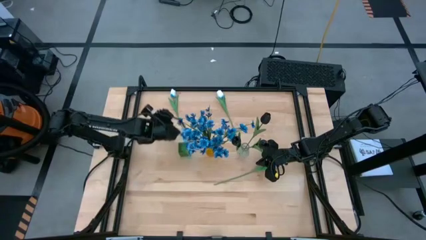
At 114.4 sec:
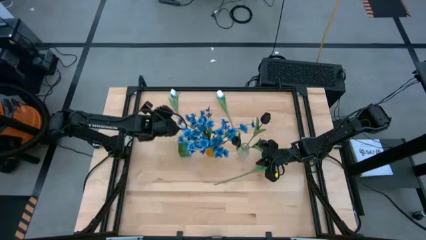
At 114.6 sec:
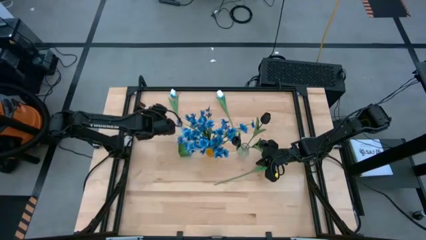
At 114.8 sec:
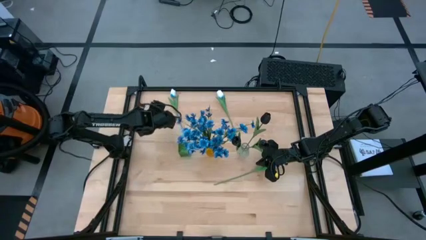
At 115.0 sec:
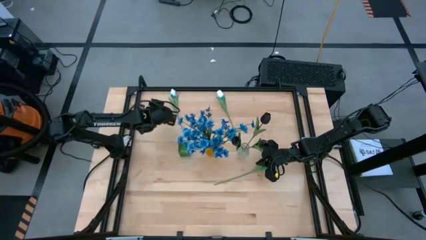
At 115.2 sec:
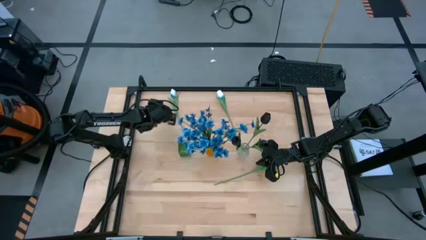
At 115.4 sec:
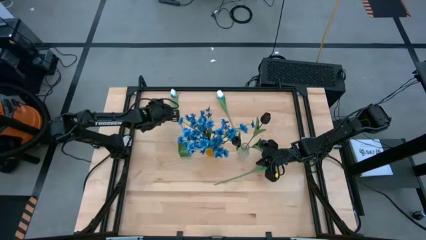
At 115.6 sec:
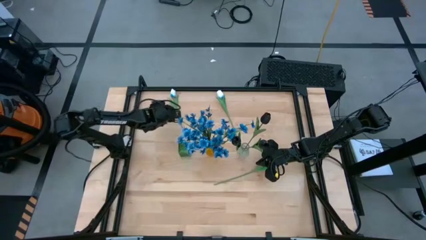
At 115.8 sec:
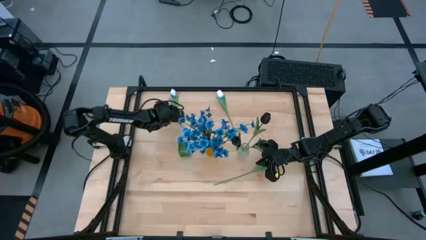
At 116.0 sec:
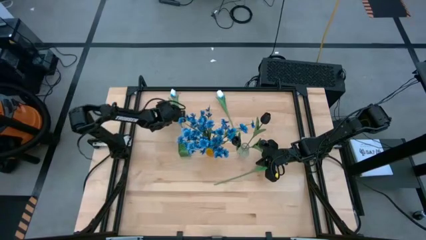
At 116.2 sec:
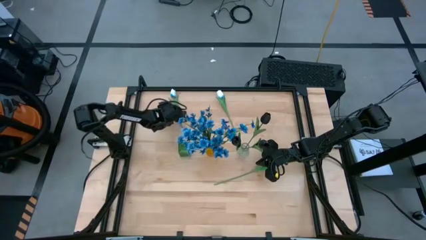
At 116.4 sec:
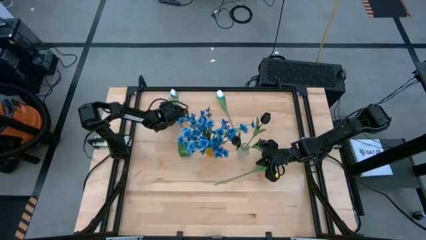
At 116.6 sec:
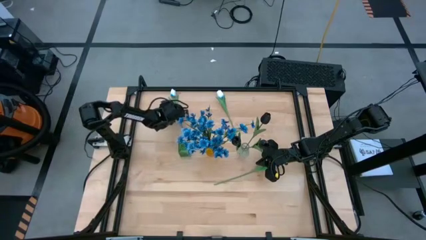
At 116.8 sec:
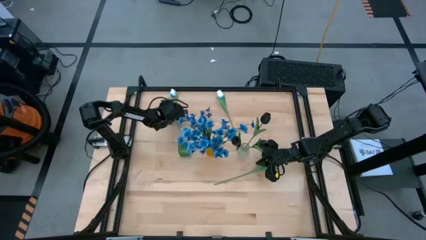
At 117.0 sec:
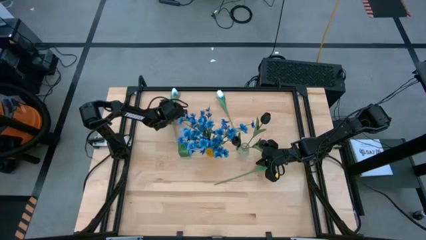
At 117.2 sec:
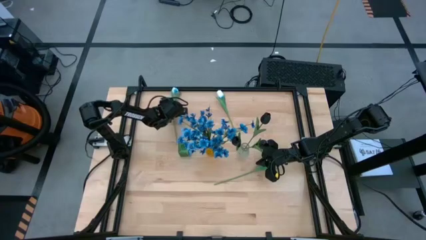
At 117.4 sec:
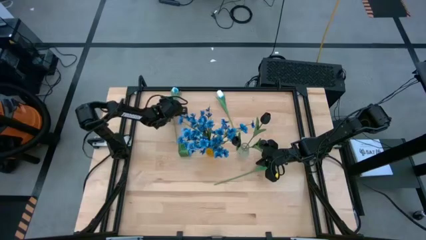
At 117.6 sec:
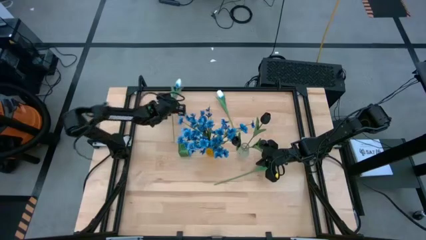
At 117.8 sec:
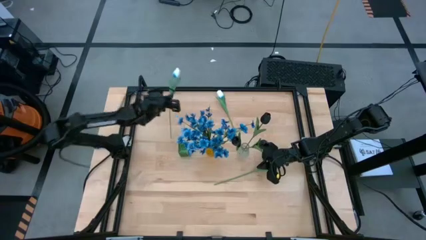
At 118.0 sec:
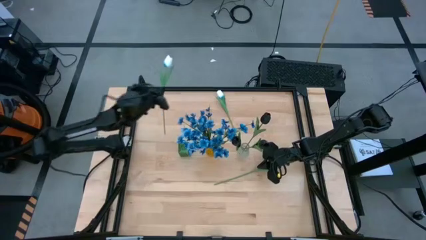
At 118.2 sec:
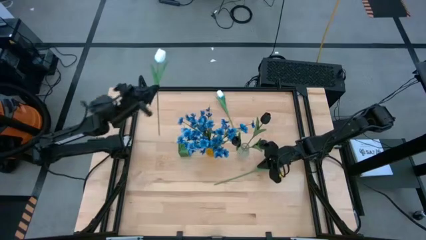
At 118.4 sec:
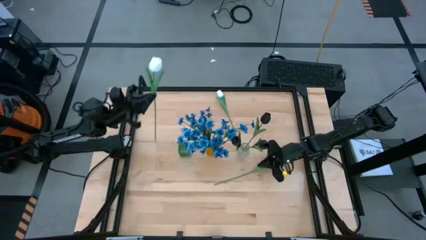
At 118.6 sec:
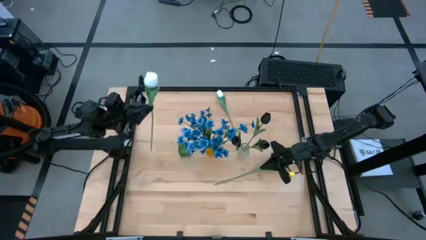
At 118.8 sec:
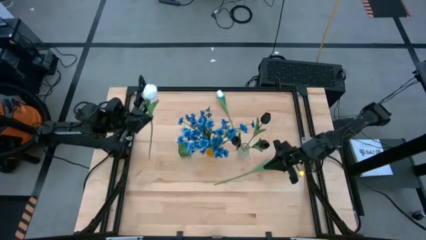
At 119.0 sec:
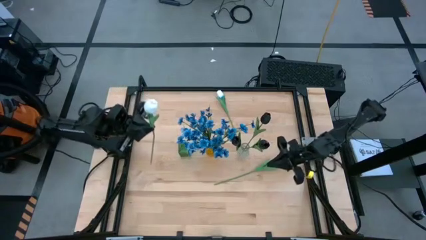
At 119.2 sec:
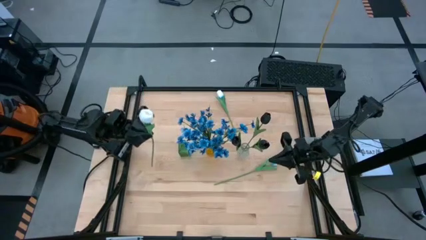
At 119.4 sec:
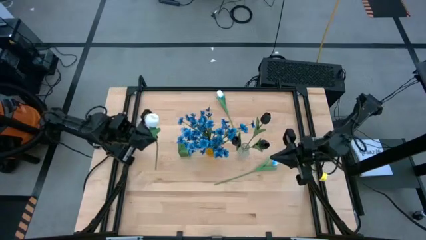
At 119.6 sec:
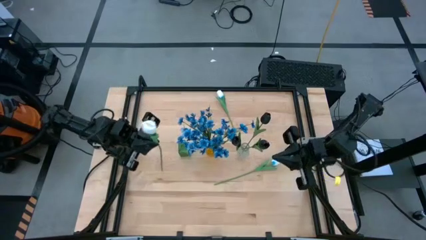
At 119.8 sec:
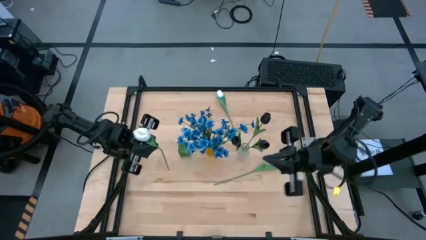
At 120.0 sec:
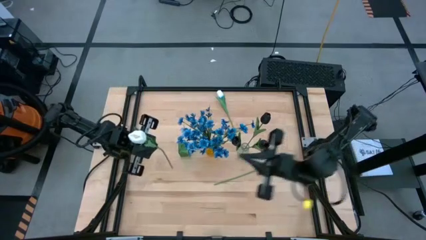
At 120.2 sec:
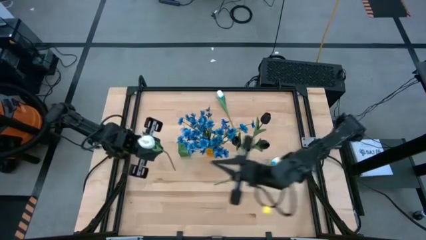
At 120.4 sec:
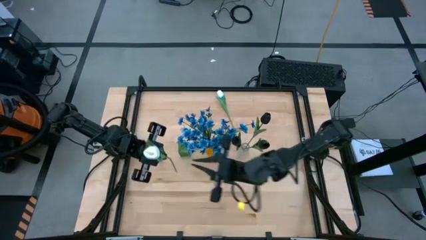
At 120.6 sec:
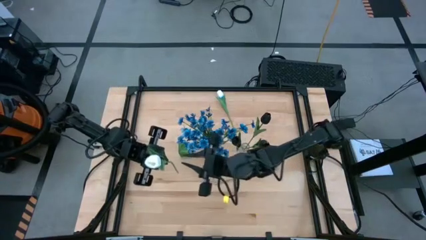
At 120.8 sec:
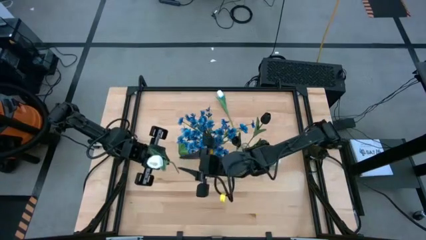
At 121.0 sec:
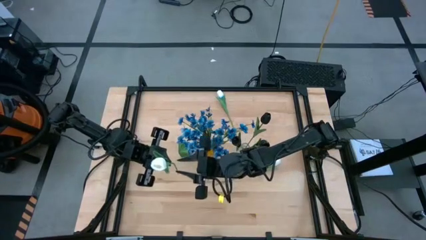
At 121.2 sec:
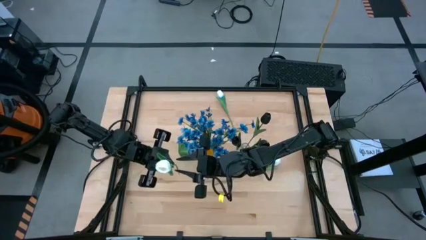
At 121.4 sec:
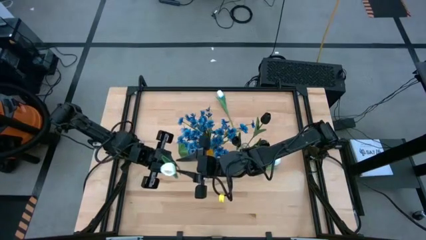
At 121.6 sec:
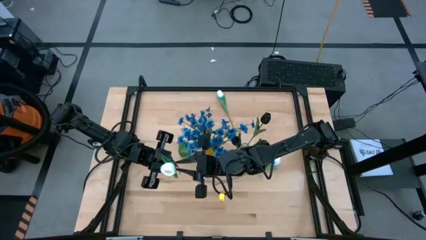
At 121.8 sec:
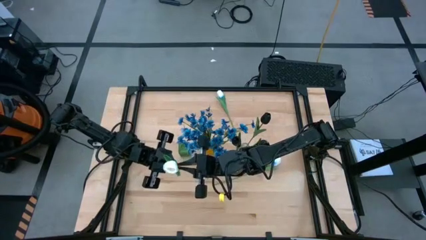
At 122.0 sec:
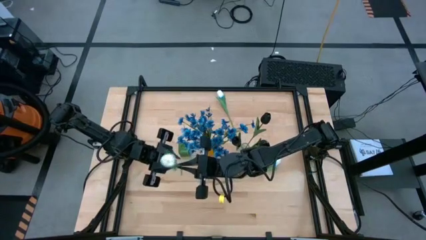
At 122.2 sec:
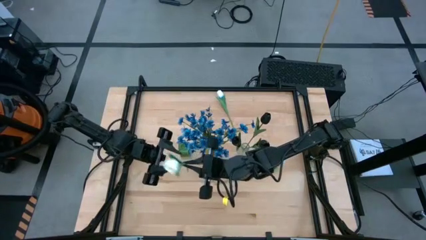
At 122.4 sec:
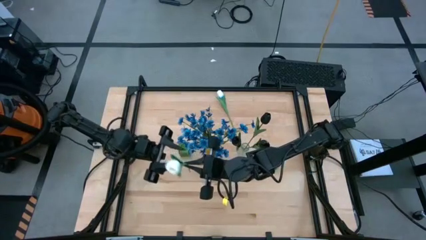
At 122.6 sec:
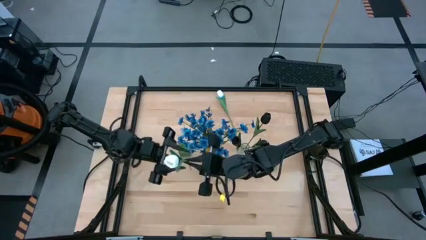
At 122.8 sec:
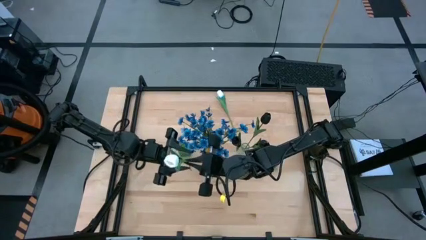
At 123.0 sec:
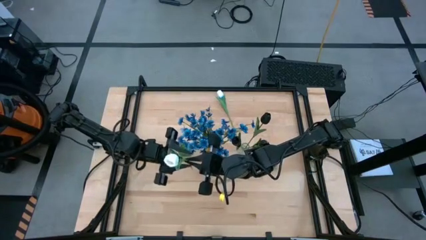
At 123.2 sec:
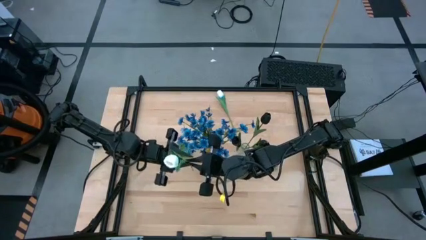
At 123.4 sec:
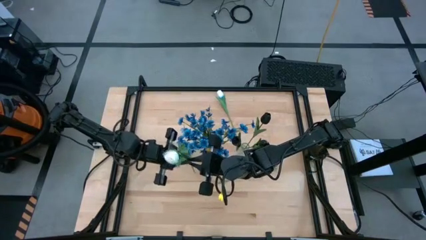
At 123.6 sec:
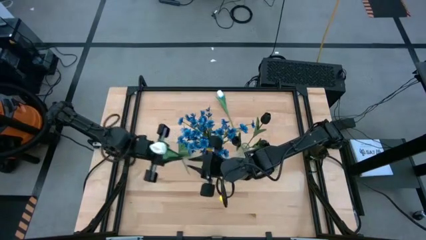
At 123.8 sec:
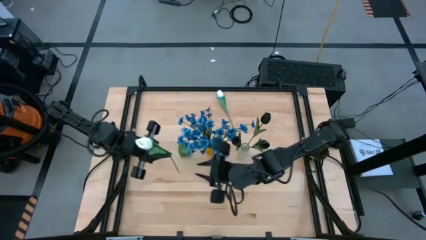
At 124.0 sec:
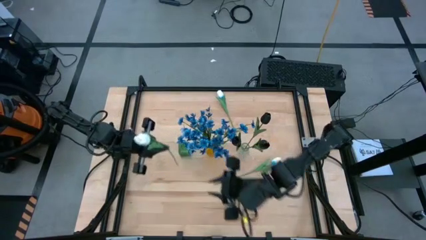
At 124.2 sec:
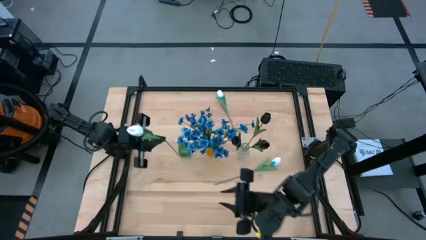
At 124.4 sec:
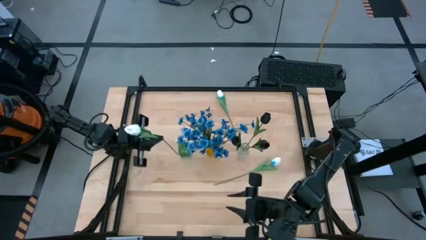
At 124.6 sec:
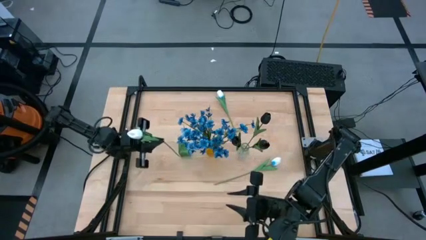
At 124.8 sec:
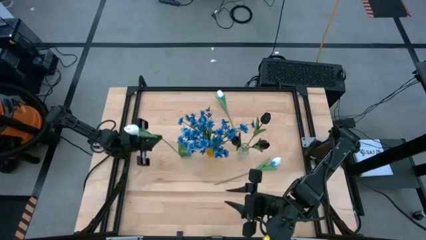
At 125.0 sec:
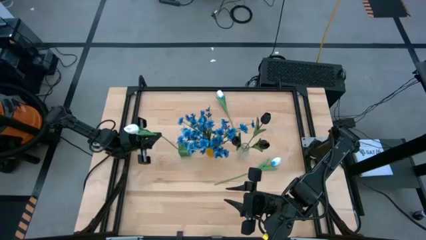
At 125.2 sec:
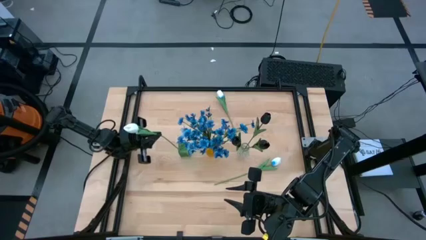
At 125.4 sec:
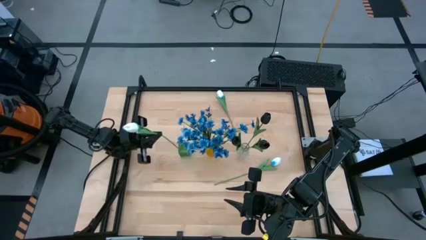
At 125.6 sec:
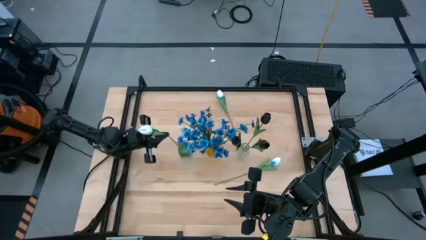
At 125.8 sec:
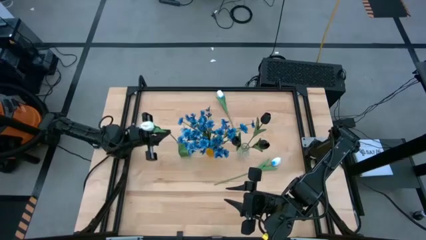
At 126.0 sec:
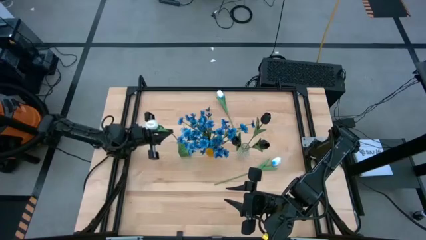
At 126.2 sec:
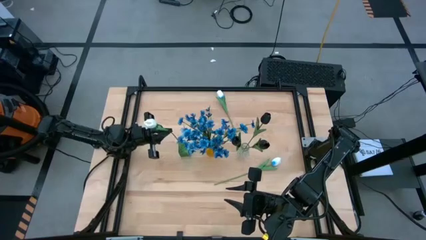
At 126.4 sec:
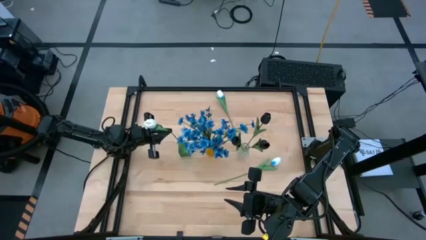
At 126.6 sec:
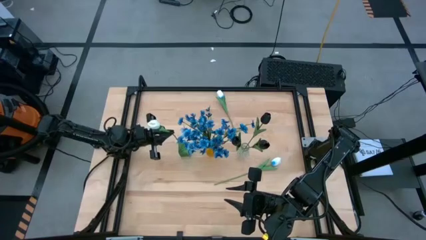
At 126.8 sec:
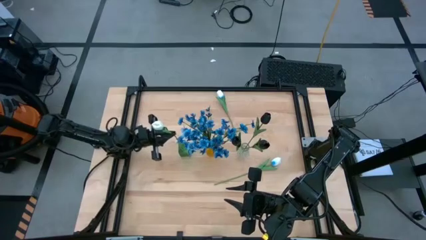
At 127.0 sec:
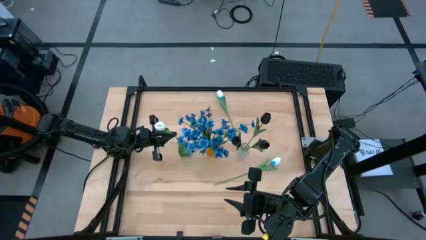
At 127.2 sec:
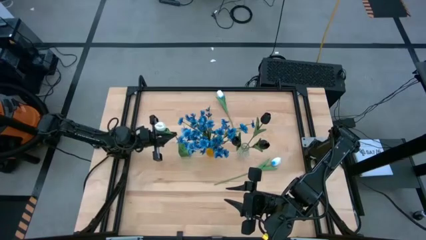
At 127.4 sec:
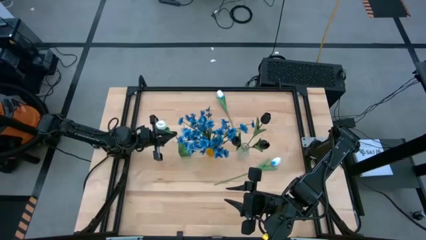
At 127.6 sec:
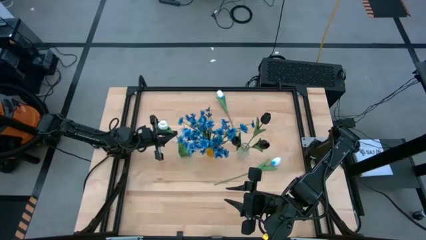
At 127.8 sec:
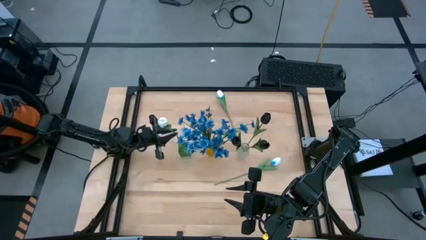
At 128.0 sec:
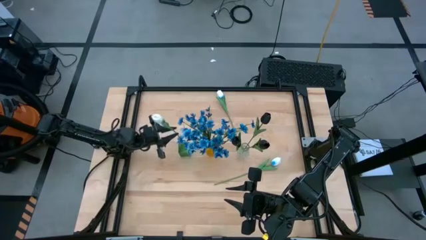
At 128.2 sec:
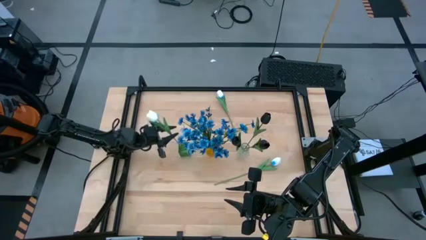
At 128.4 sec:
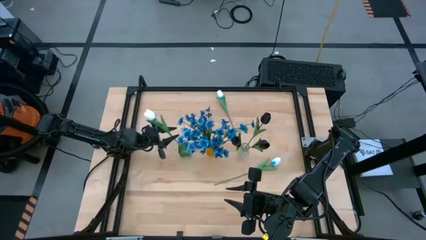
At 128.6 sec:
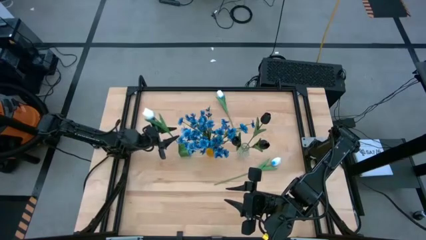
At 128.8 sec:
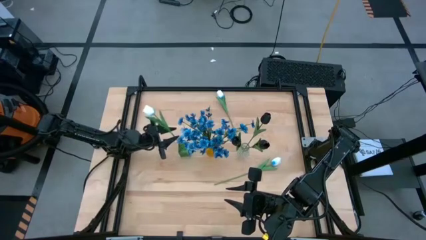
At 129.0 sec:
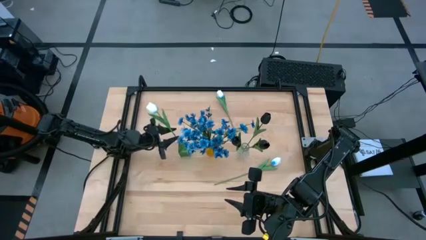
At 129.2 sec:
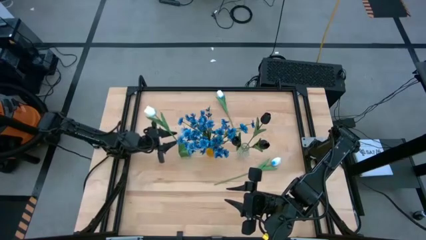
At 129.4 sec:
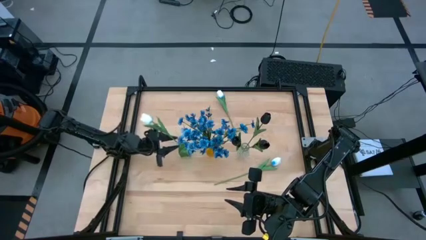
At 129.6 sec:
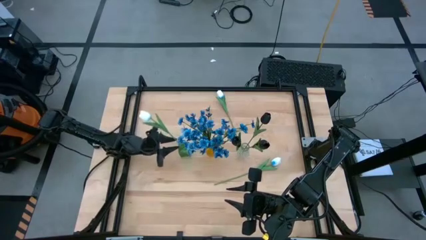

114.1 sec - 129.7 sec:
Task: Sort flowers into vase by color
Put the top left white flower into the green vase
